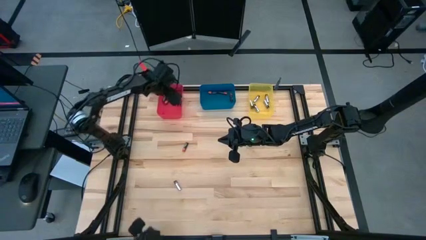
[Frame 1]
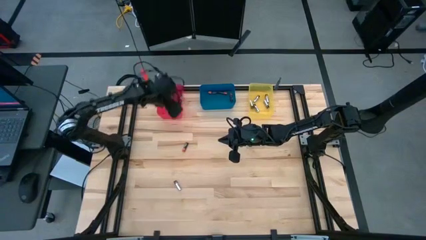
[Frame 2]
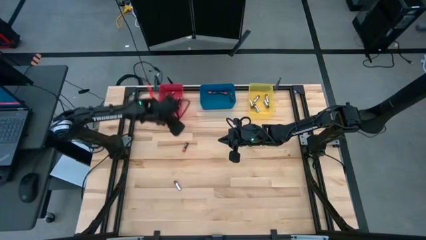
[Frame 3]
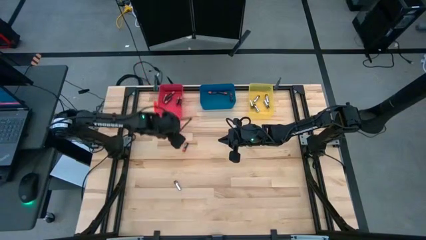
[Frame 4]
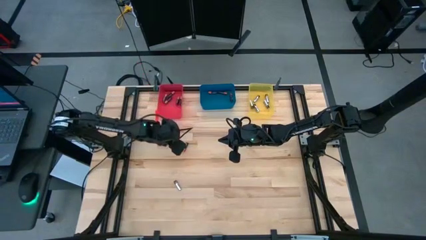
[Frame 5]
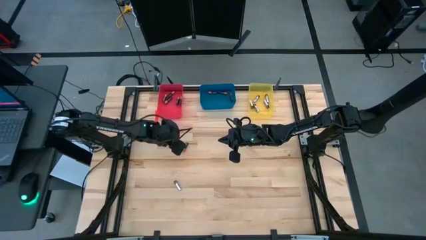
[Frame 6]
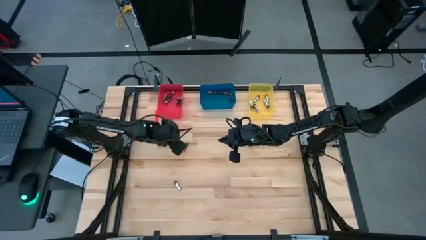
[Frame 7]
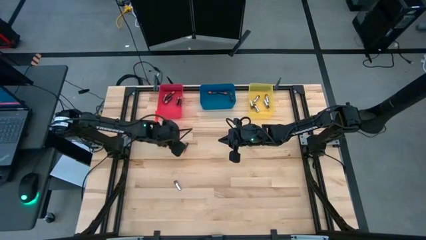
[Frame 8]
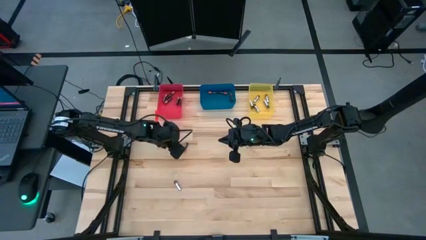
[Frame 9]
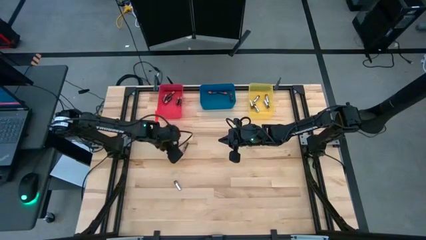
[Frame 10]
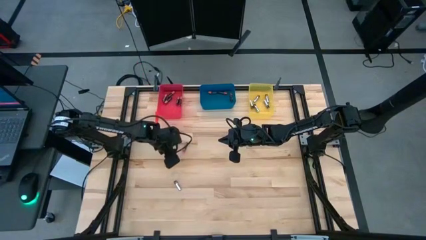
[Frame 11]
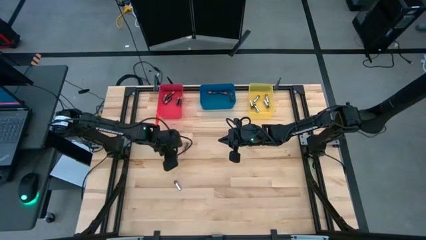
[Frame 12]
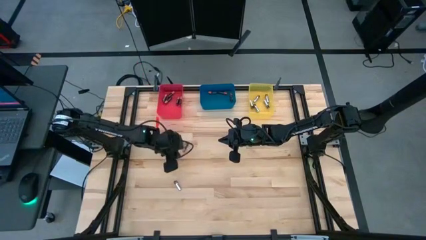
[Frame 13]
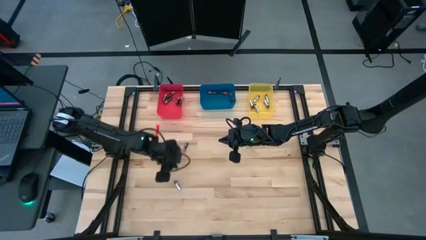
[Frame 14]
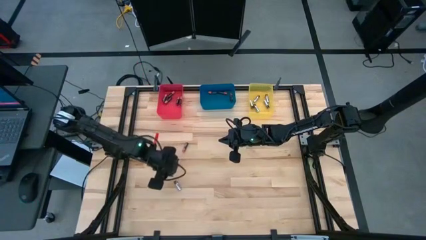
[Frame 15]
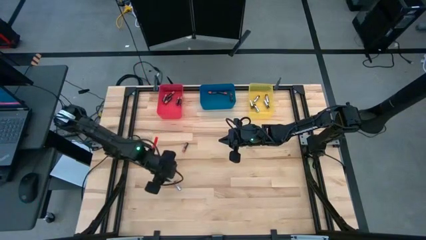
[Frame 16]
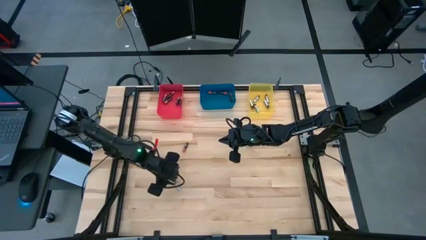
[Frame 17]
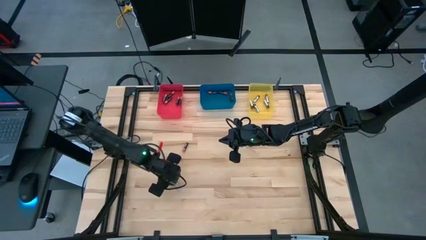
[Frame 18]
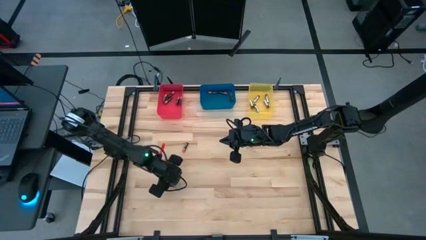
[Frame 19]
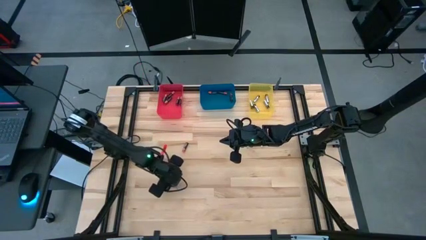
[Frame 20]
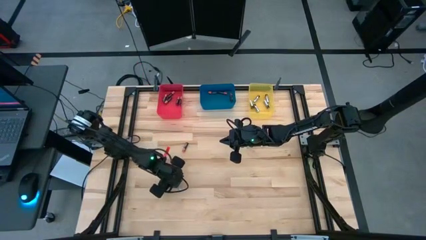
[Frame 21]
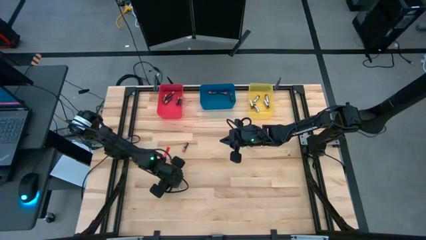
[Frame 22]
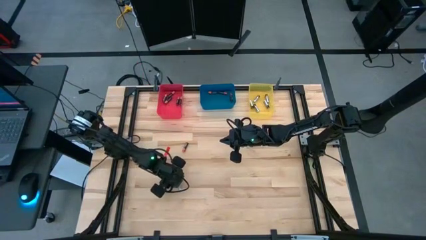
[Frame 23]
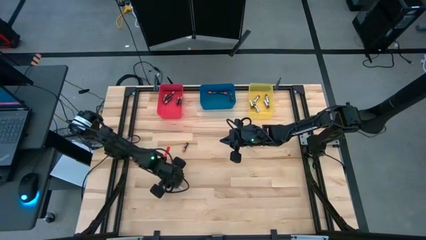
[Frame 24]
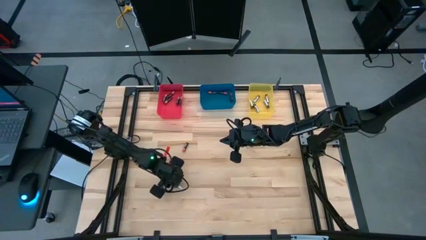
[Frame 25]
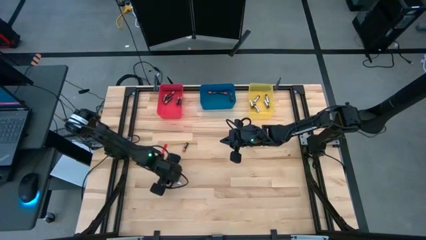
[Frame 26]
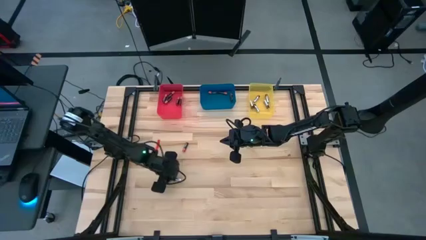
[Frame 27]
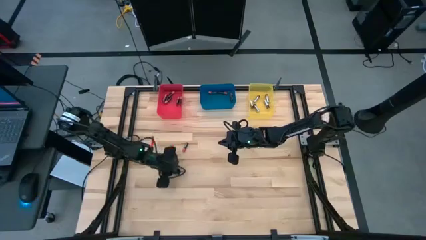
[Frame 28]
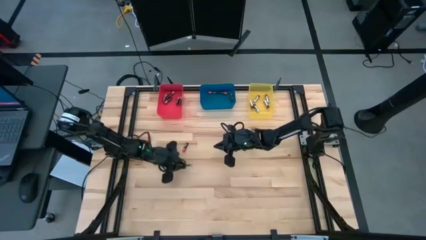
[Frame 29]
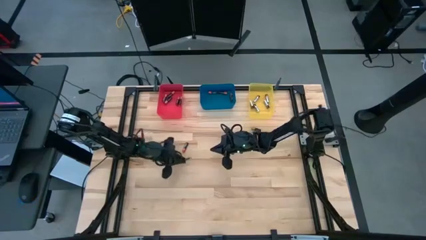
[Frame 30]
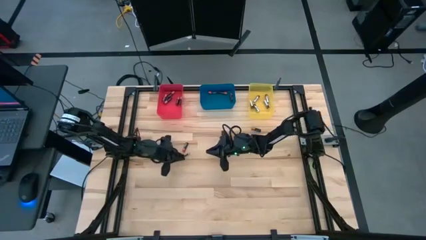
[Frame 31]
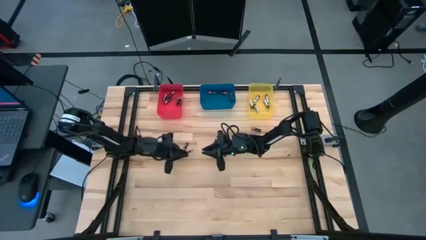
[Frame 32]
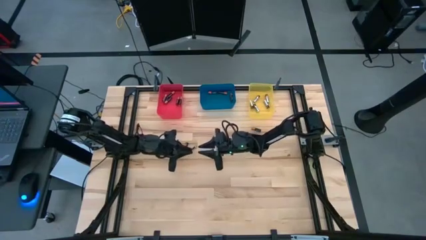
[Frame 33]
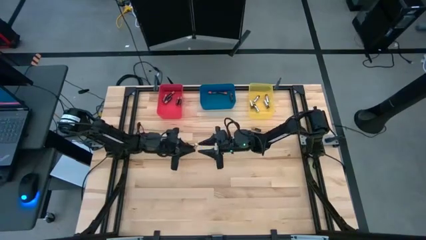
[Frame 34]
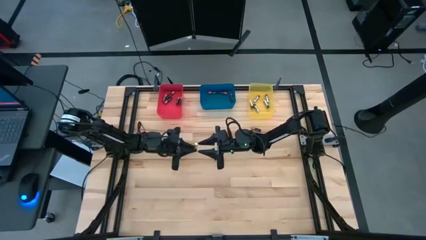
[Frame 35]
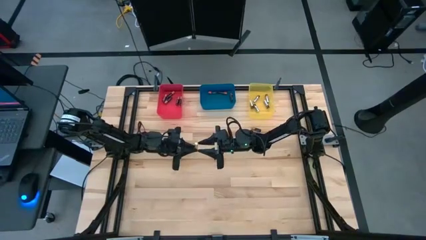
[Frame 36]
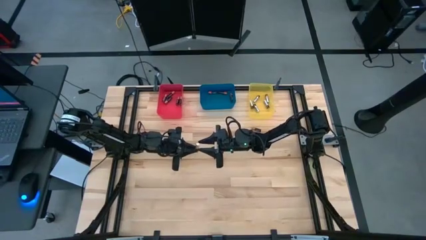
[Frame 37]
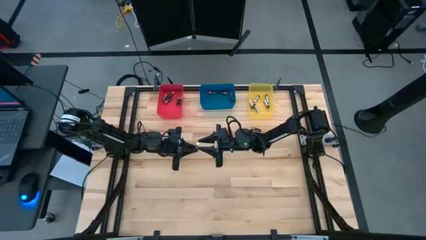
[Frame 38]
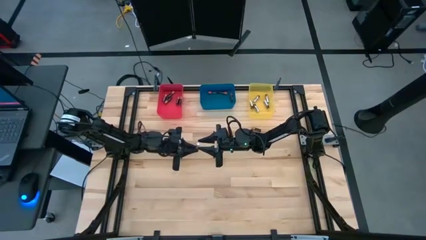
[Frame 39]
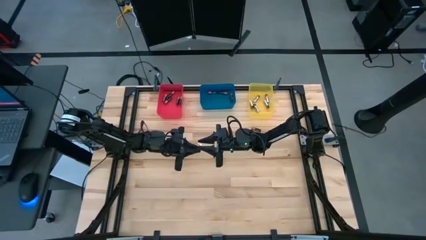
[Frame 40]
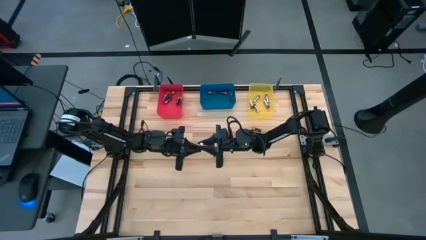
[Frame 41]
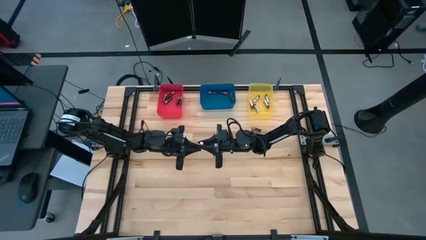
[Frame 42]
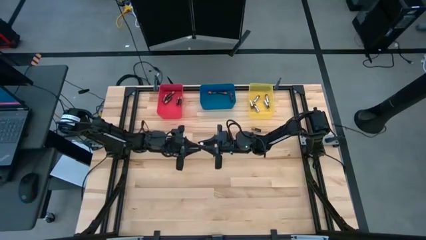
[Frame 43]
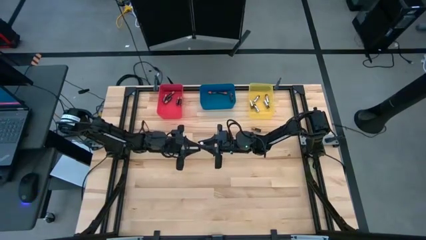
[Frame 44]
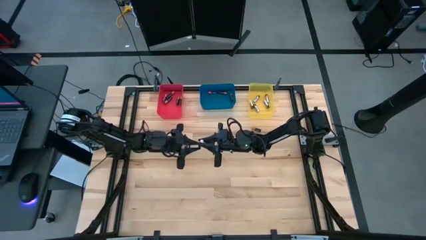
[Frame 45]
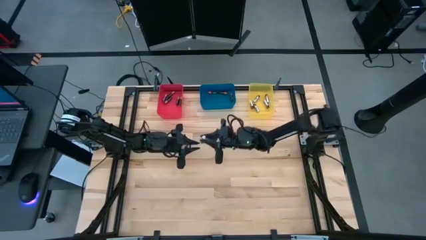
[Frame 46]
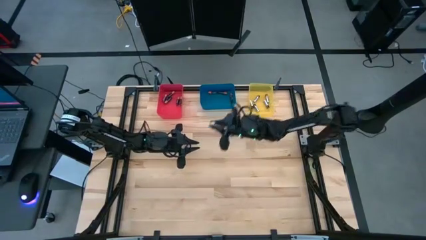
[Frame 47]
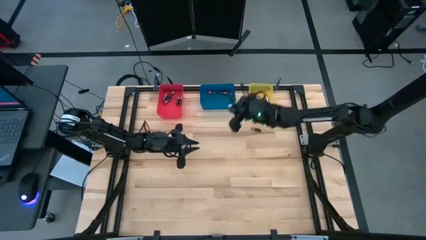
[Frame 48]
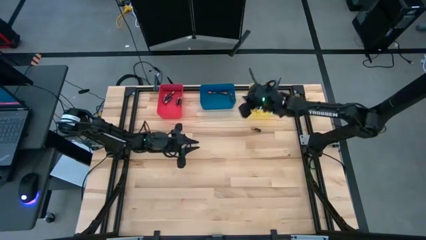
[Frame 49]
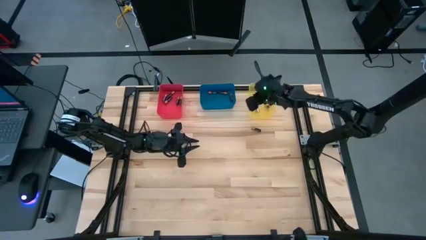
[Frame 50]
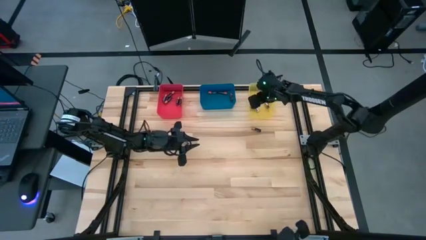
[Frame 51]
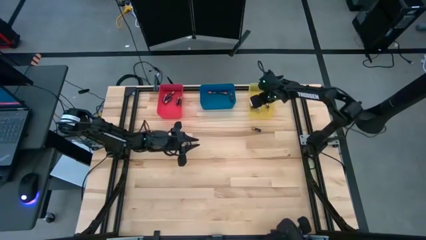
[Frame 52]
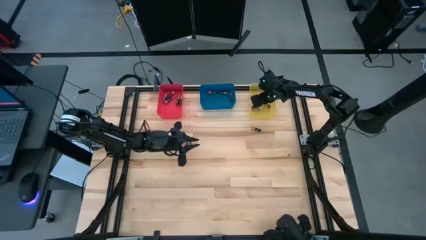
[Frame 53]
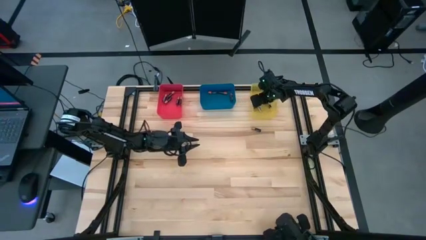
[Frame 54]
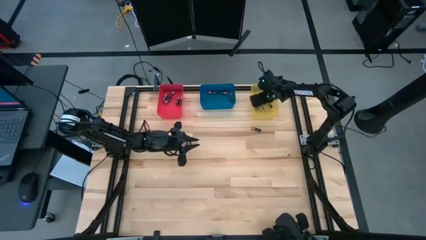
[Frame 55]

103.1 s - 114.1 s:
Task: Sort batteries
Put the silver battery into the yellow bin

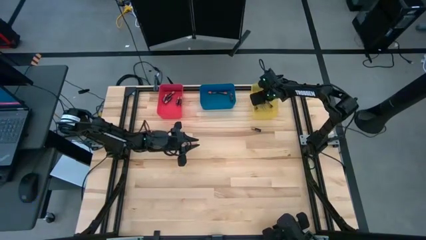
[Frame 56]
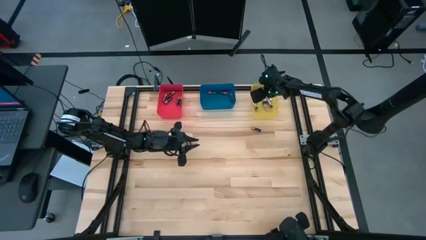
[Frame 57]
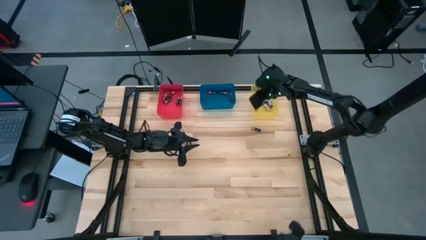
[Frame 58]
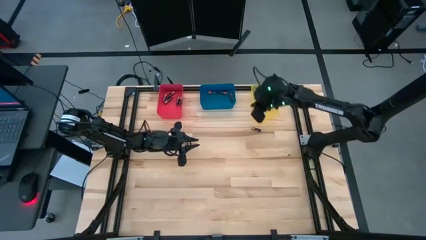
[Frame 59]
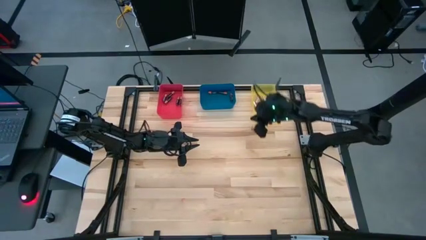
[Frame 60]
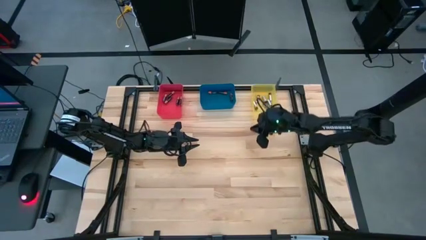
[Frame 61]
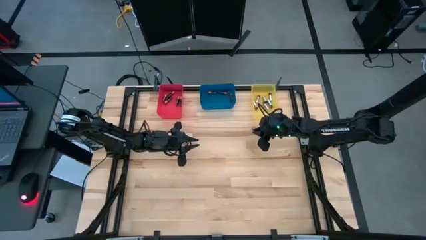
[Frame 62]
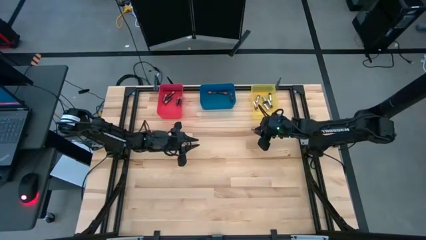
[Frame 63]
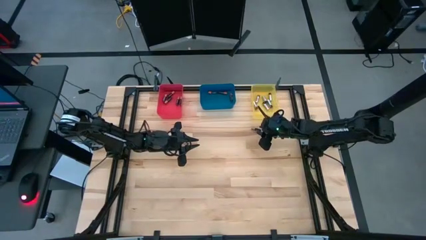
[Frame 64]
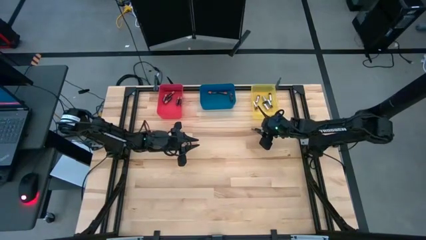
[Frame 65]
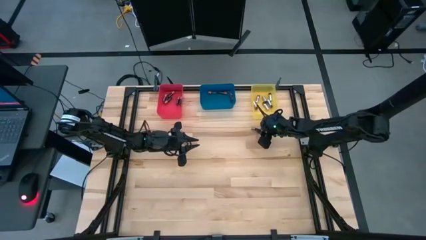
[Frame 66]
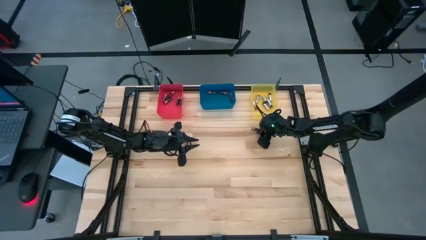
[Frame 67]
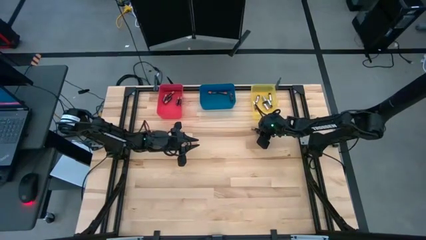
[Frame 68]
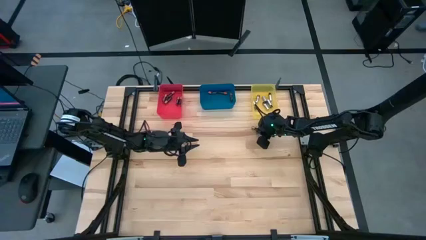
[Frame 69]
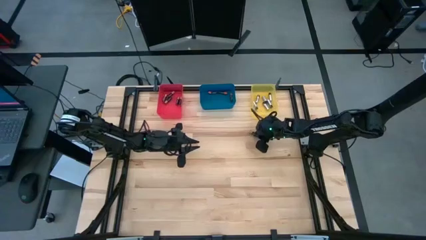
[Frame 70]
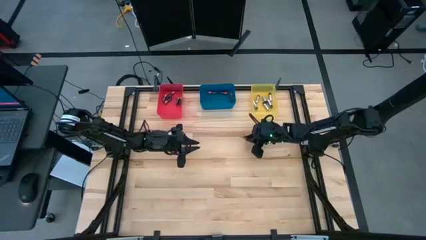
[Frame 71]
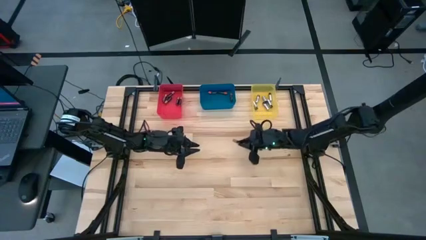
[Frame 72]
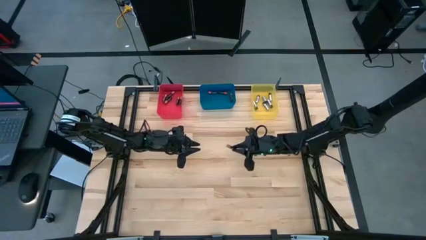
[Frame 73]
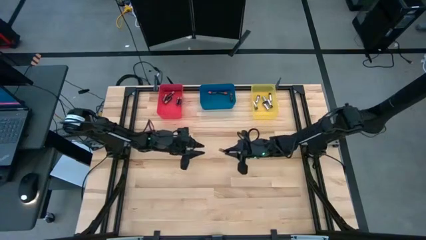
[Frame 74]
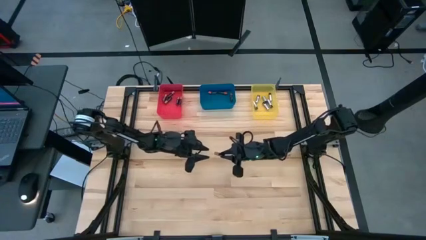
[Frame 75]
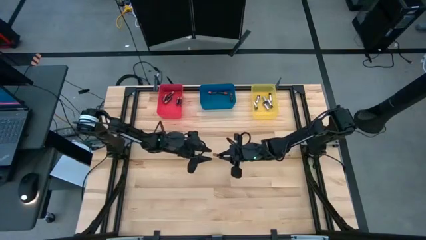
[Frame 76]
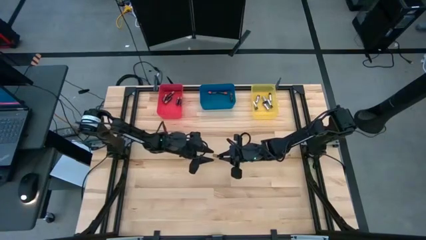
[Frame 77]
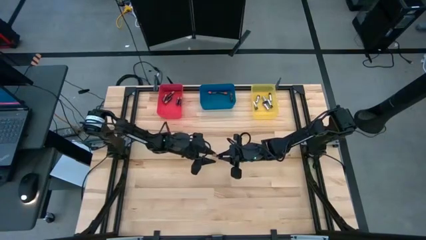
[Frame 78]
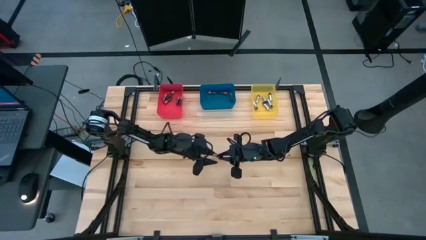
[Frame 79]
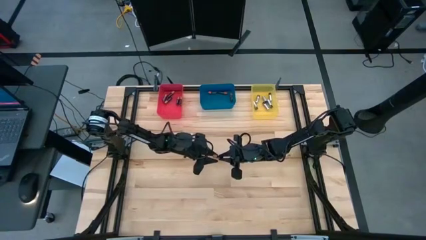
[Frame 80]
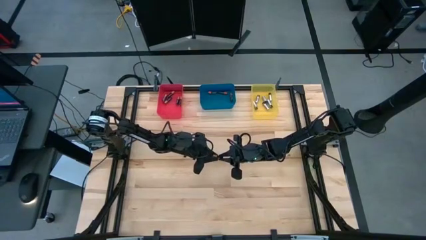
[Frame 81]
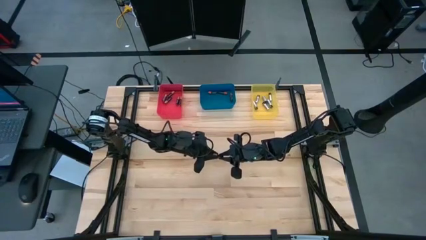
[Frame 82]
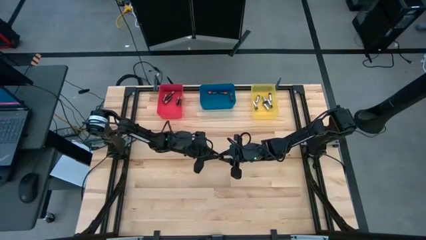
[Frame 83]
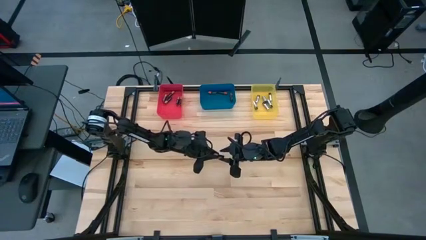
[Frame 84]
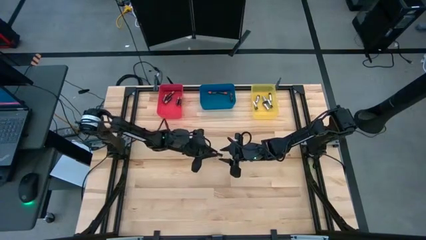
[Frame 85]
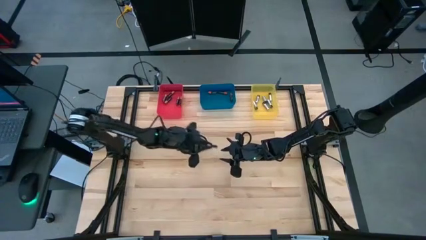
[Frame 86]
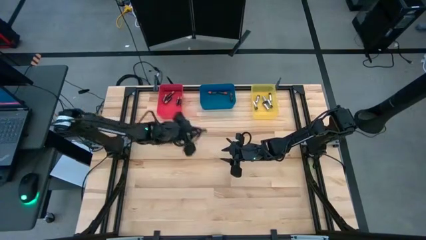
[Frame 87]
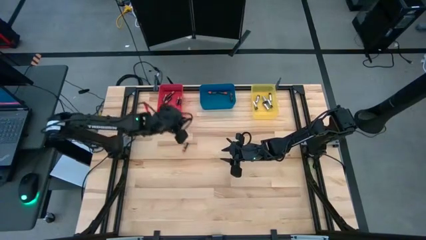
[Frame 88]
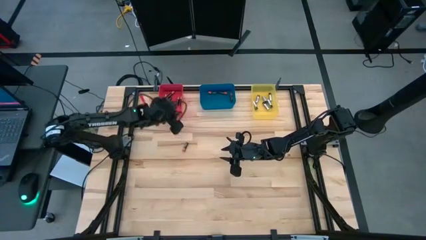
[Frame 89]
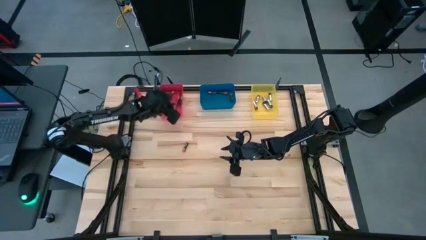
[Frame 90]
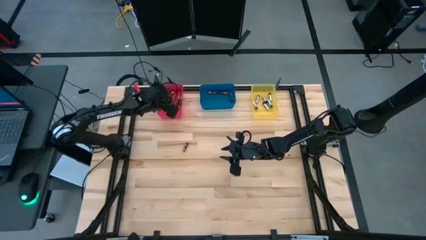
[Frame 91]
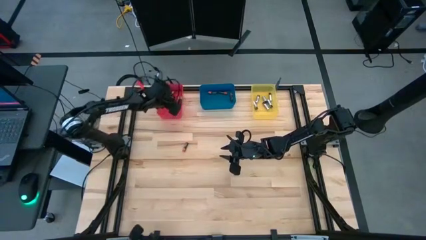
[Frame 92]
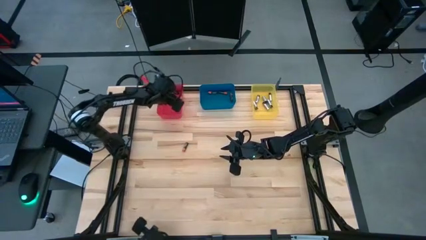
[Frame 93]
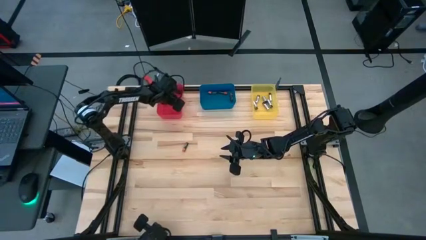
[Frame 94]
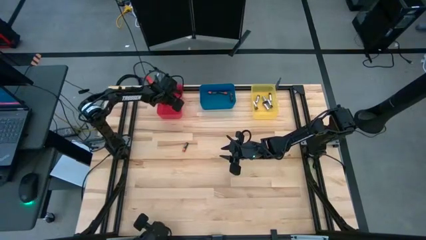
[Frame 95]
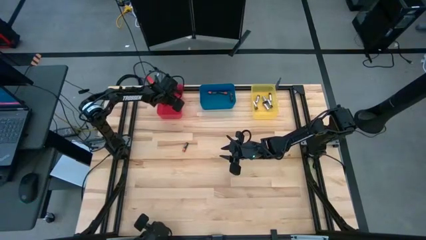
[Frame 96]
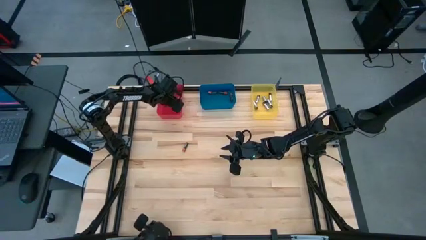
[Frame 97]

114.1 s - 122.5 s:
Put the brown battery into the red bin
